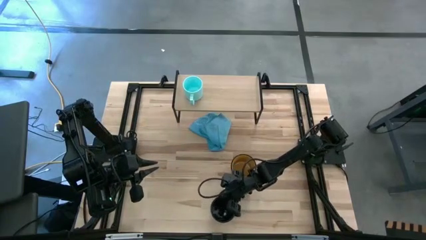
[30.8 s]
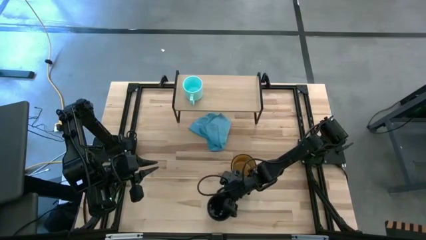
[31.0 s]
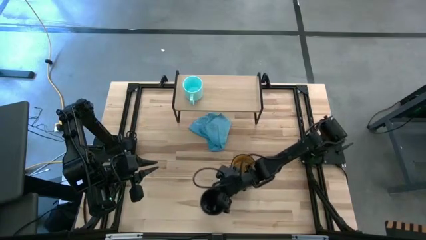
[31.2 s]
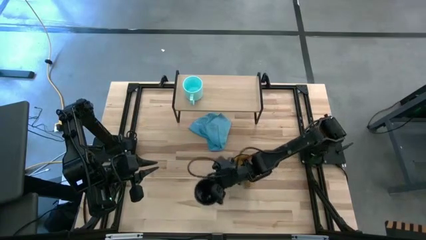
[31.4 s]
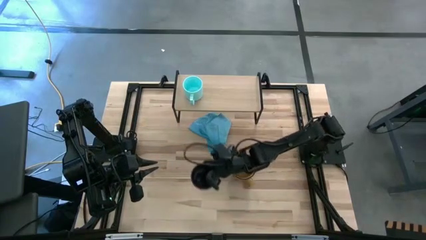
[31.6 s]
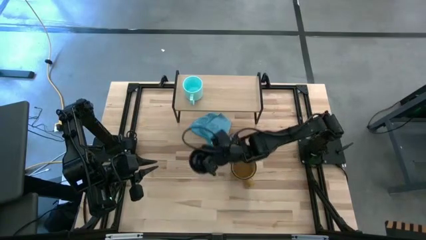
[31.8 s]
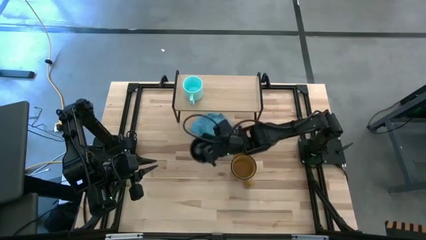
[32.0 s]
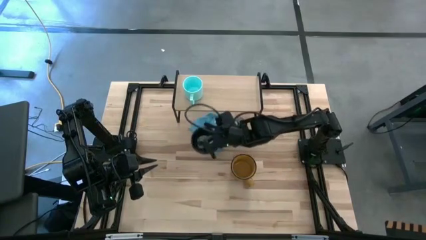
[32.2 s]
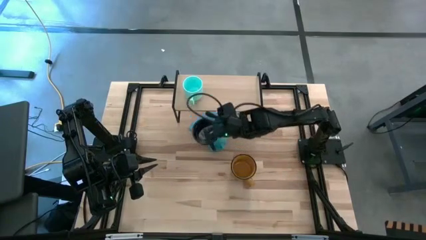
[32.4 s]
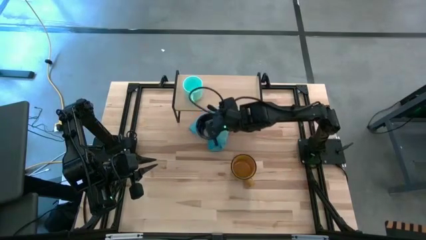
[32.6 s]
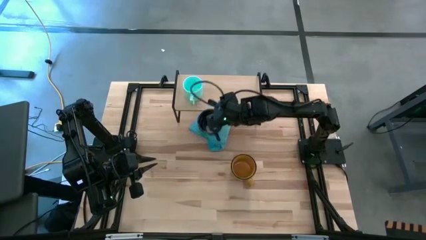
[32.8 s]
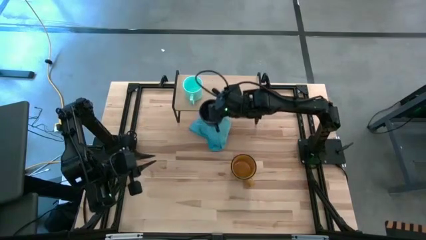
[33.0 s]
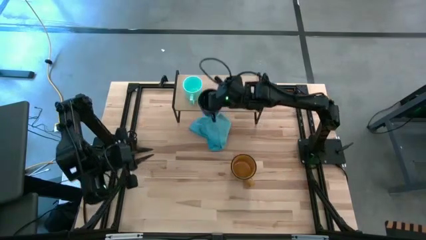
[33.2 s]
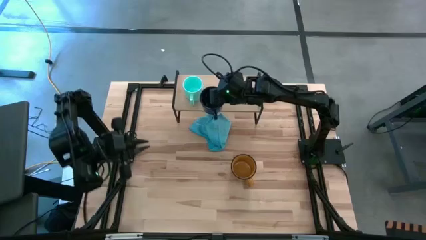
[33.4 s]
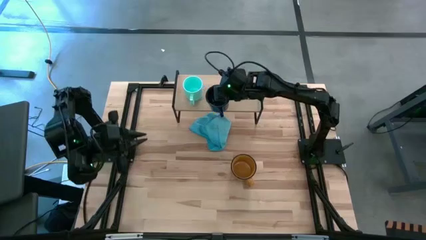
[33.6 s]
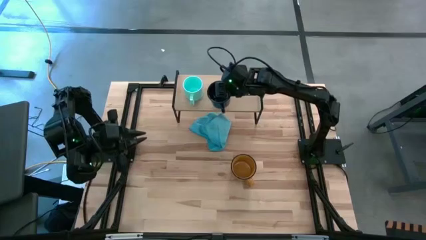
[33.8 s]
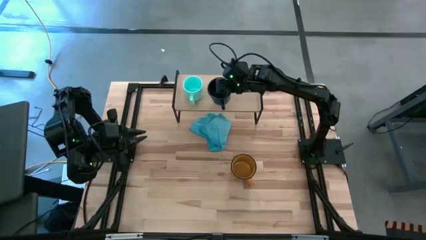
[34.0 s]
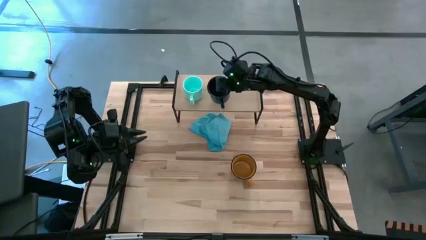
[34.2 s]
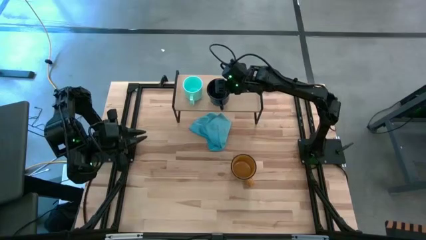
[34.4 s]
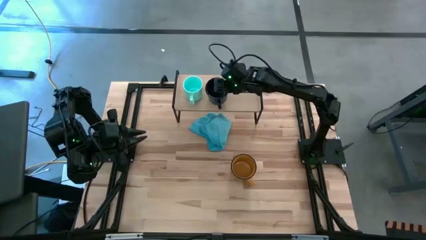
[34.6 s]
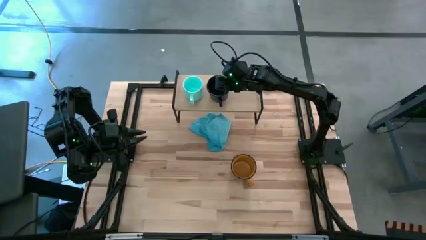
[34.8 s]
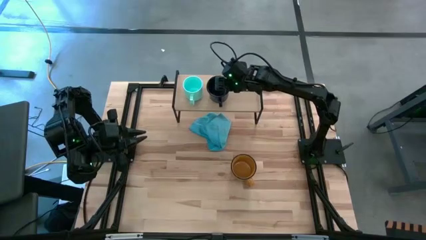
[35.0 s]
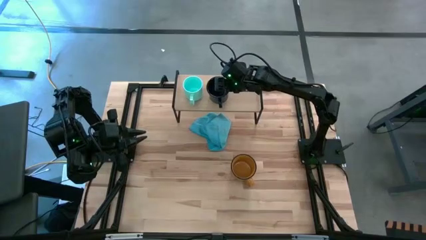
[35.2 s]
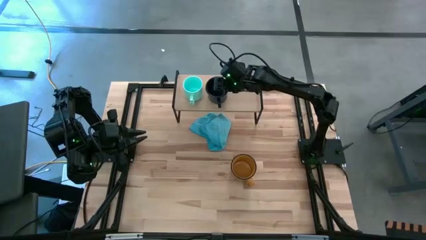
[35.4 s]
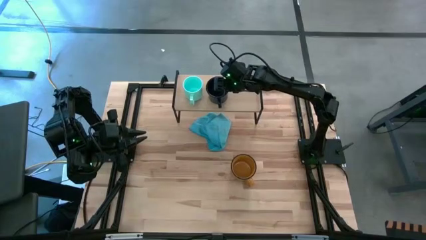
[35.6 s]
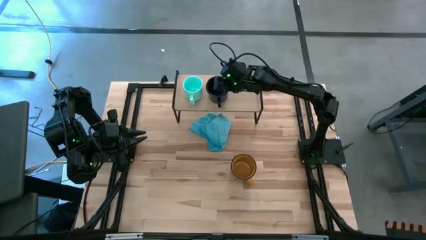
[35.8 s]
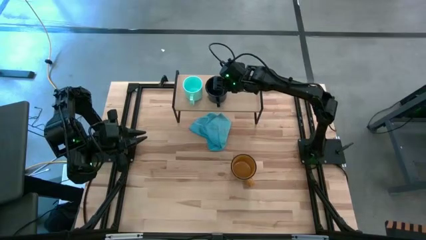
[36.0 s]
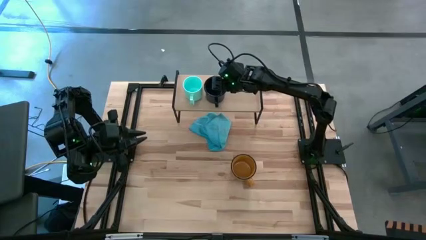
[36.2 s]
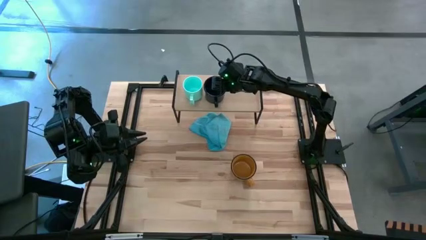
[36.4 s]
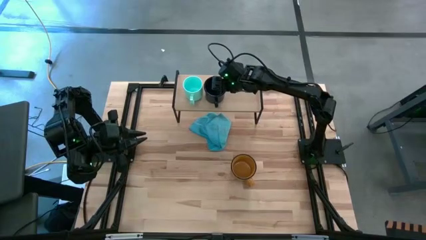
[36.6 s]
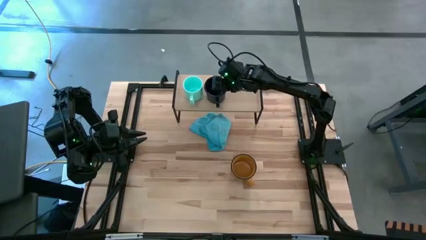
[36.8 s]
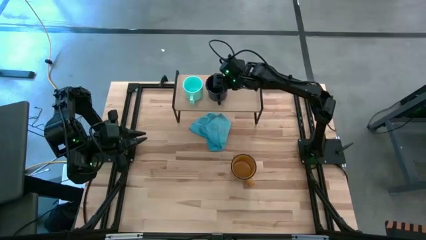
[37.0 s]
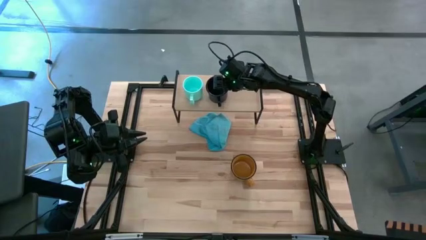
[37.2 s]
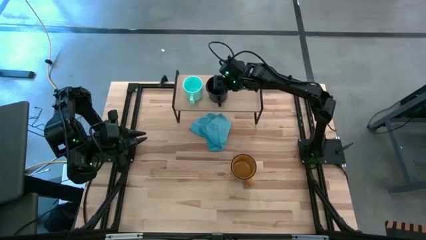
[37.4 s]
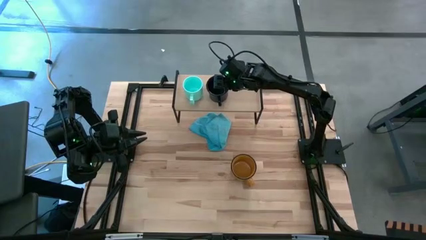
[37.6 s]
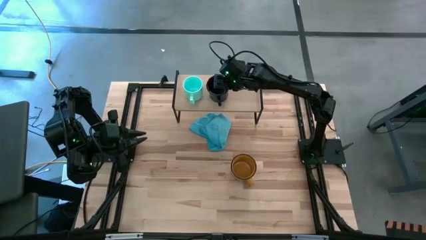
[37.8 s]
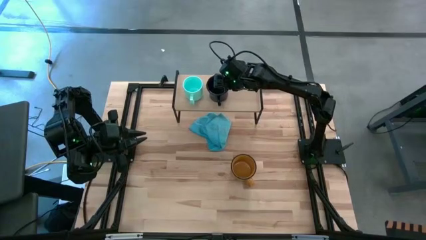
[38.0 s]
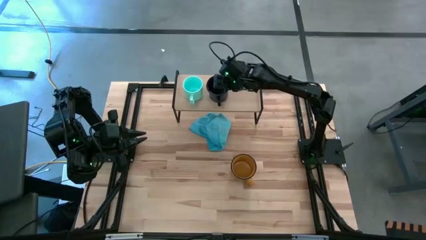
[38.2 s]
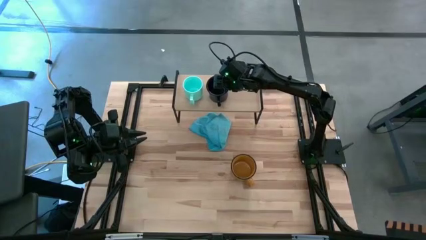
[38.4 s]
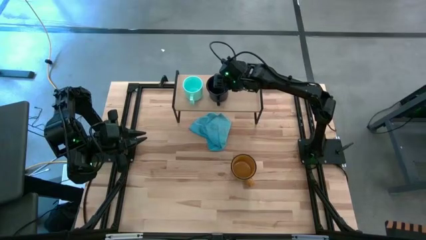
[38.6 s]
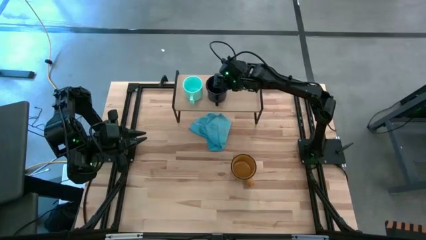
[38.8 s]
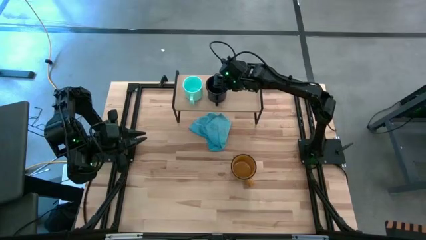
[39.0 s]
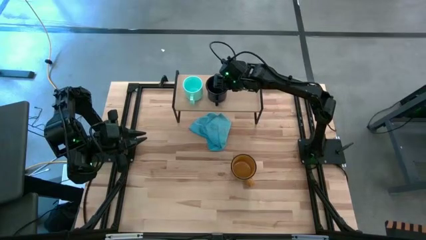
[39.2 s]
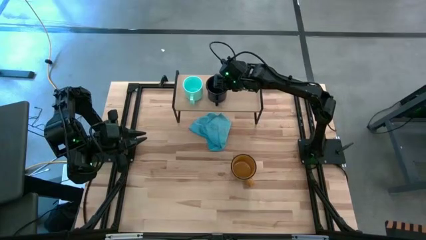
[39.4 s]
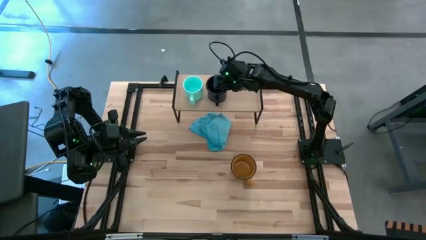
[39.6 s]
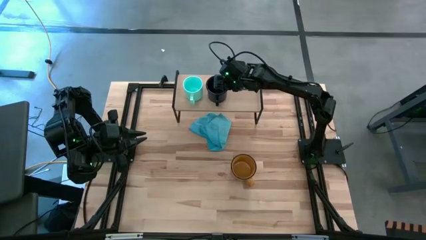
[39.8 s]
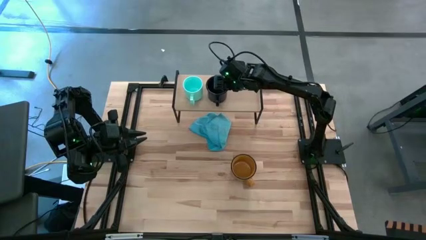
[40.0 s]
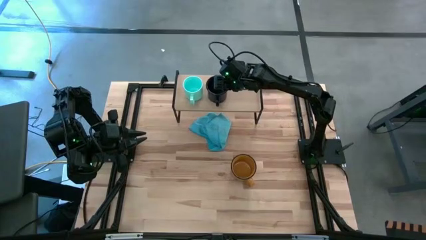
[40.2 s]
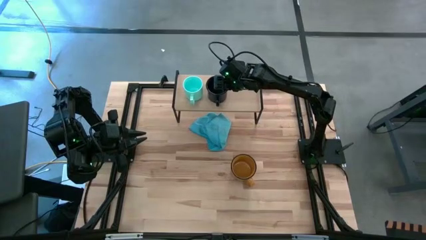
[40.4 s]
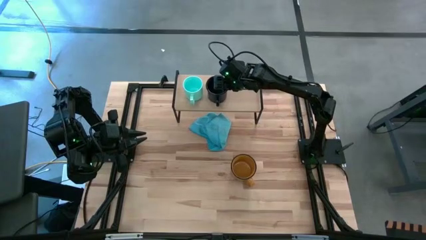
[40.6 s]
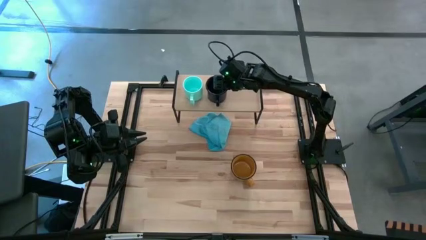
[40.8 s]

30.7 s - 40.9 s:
Task: Stack small to large cups/mugs on shelf
Put the dark blue cup on the shelf

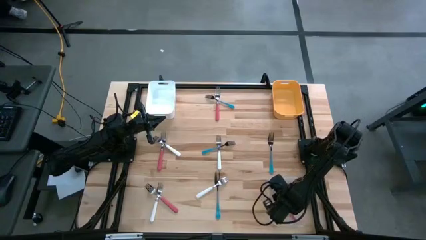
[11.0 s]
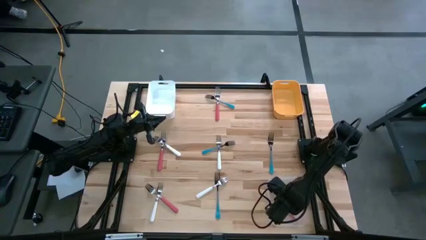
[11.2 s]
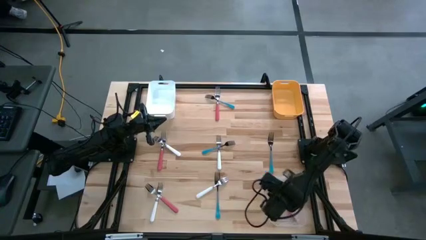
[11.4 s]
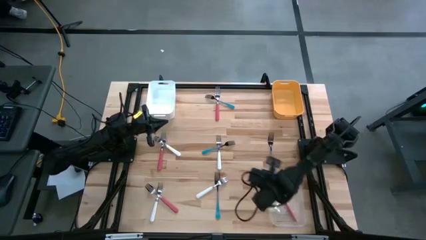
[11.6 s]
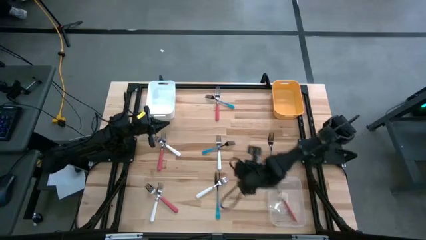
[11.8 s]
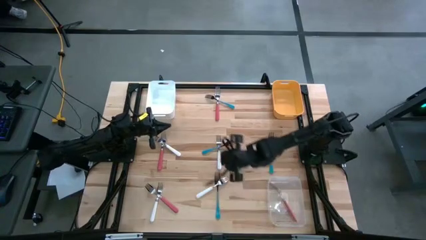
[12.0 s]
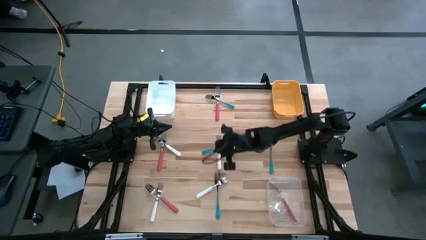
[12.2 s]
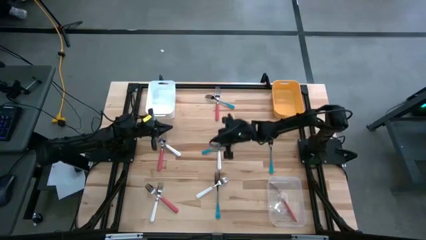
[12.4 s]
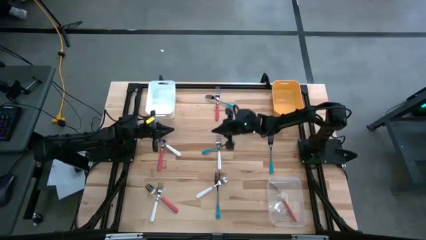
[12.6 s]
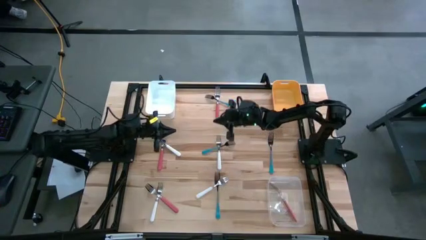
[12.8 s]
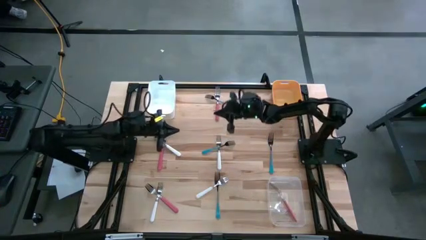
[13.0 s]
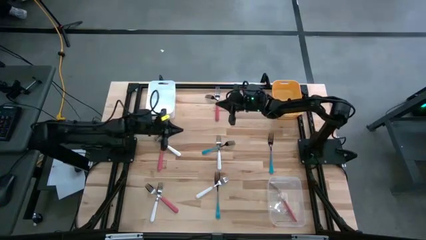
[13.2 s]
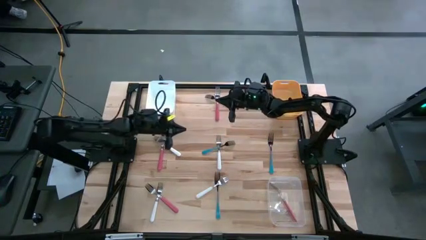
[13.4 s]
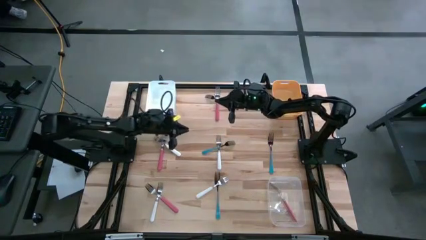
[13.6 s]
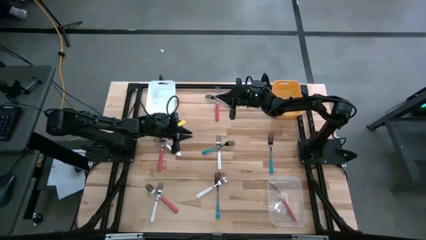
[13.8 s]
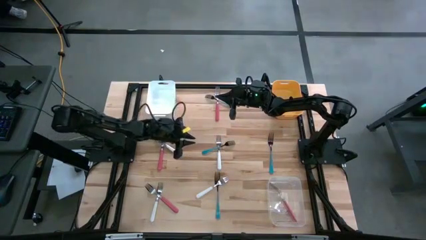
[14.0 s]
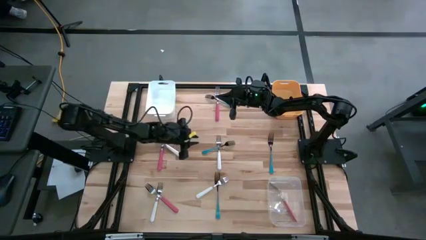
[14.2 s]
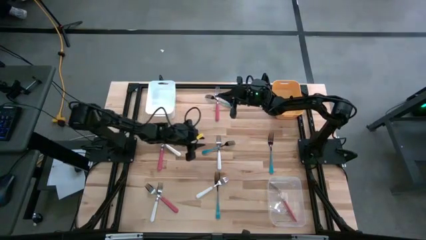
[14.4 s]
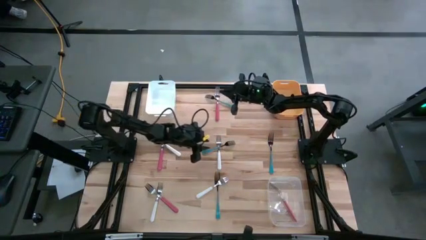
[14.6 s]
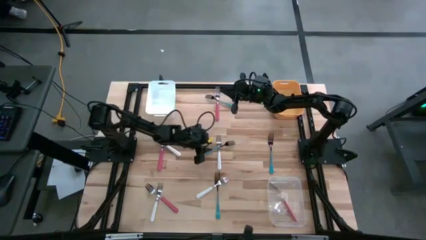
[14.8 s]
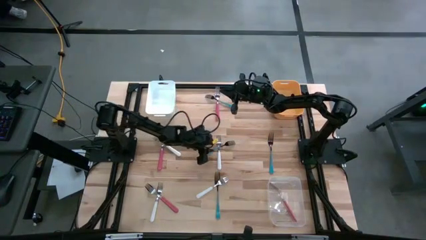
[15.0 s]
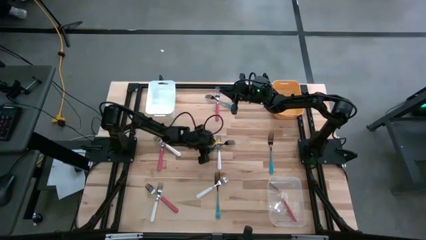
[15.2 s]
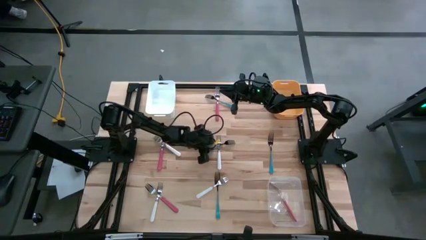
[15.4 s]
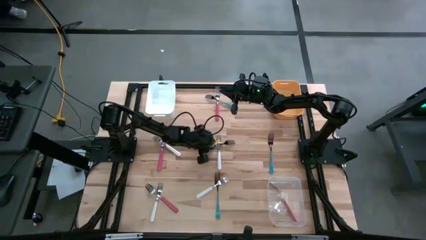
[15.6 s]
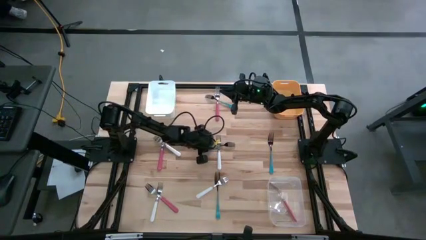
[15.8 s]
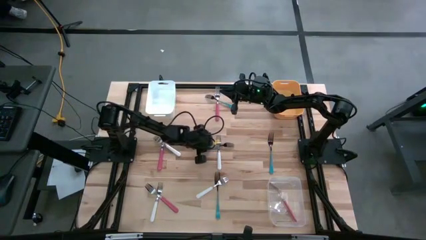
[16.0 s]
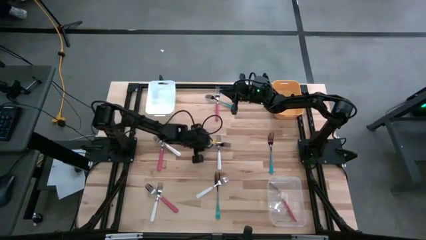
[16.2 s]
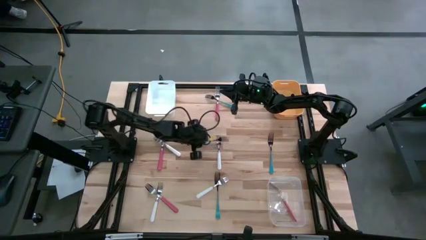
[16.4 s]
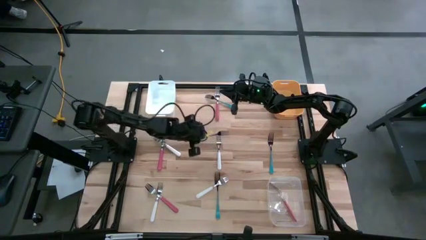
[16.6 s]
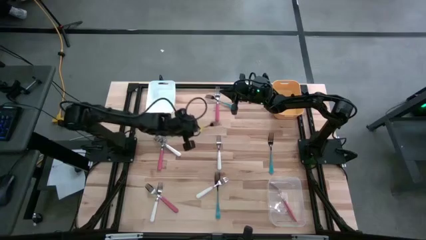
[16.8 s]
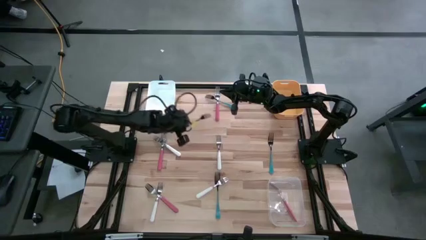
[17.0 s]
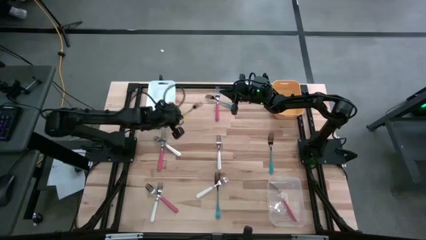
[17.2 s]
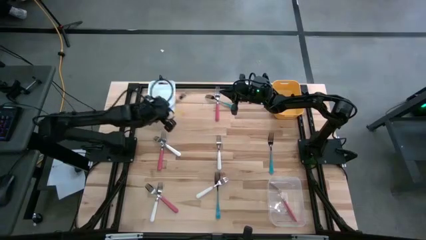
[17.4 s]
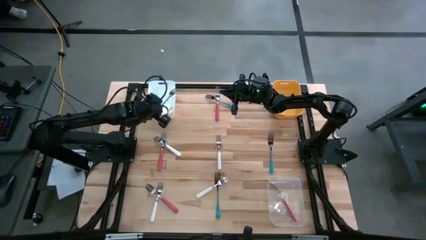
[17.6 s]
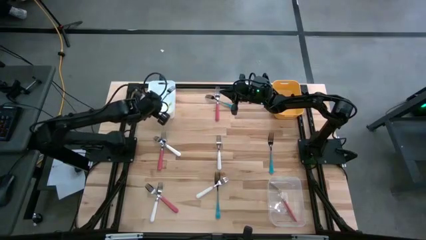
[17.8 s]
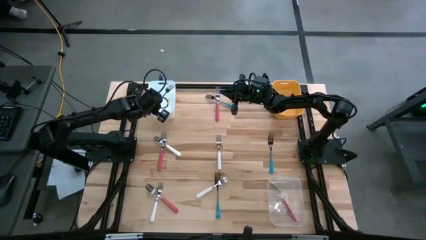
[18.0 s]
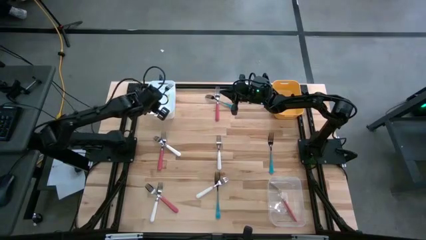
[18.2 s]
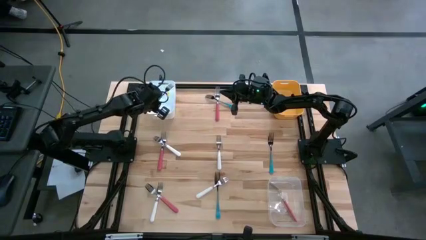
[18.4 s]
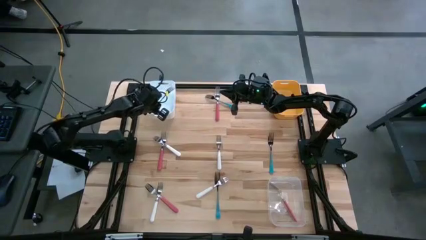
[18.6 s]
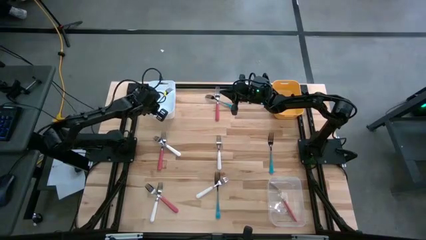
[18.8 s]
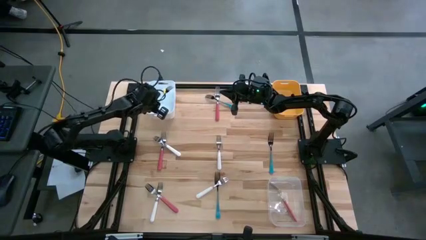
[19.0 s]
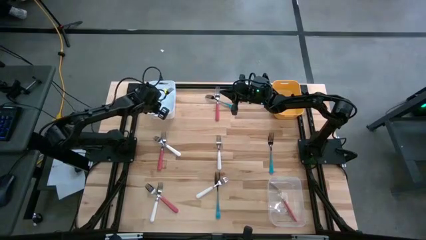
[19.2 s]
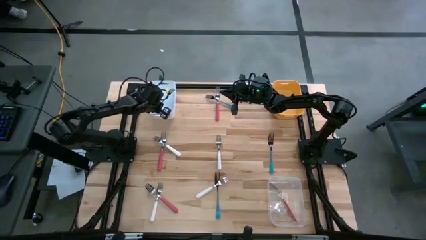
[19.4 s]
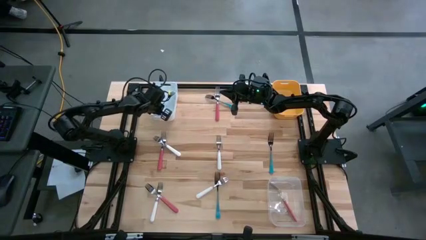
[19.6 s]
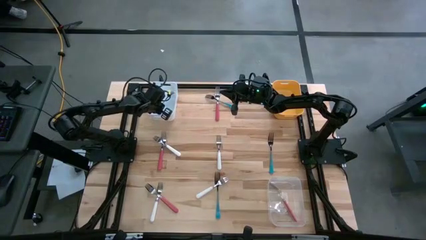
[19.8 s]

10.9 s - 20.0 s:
Task: Sort silverware by color (type)
Put the center blue fork into the white bin
